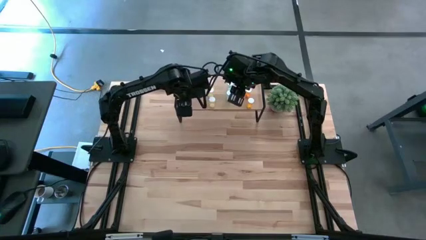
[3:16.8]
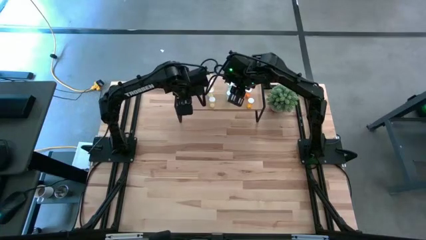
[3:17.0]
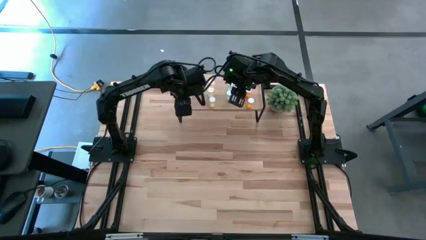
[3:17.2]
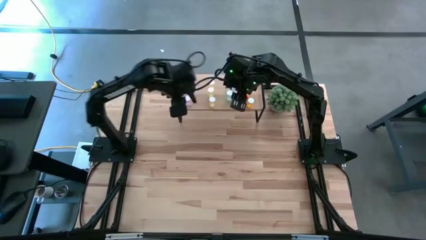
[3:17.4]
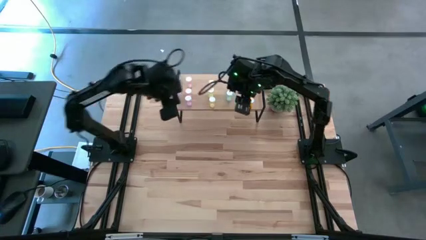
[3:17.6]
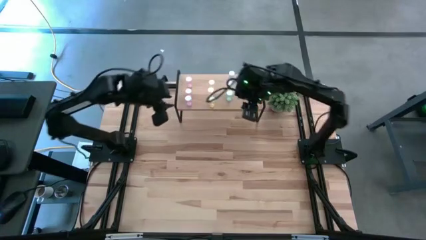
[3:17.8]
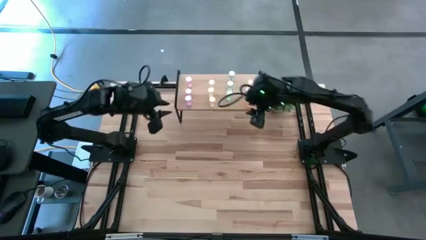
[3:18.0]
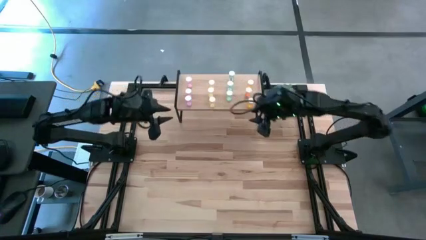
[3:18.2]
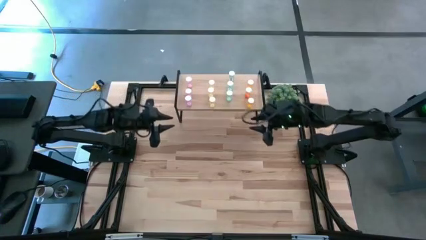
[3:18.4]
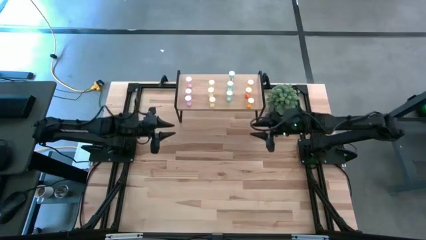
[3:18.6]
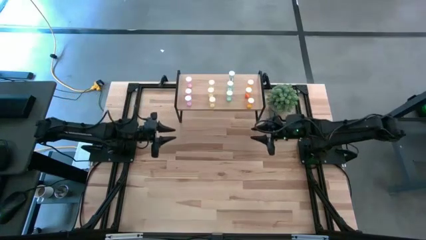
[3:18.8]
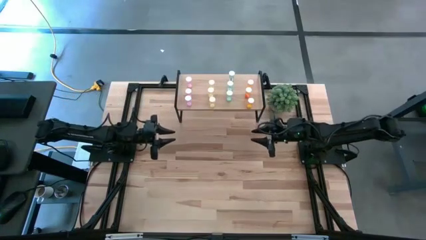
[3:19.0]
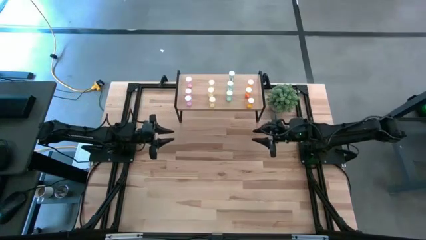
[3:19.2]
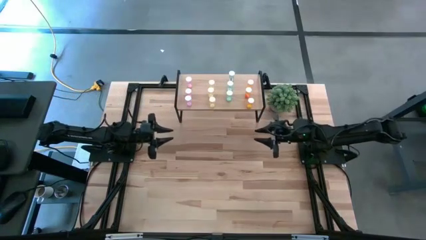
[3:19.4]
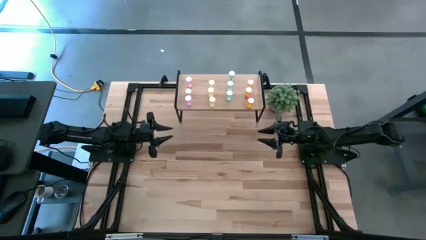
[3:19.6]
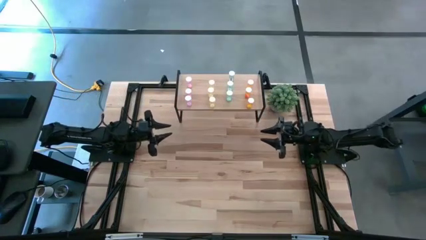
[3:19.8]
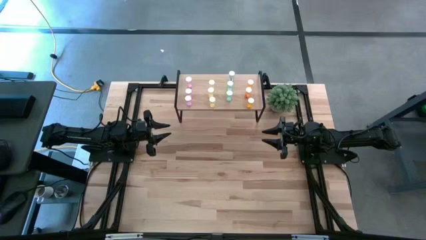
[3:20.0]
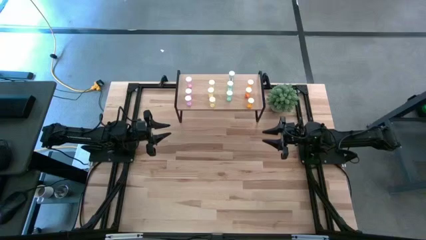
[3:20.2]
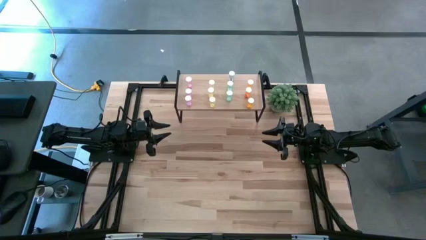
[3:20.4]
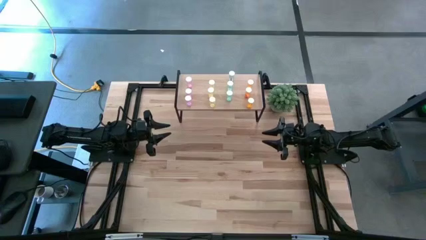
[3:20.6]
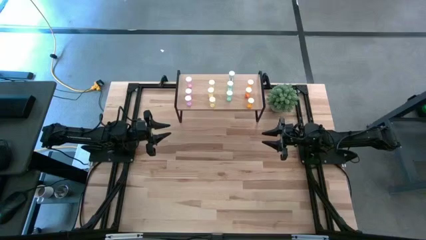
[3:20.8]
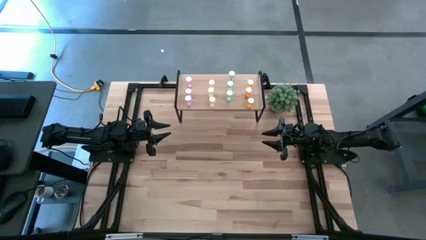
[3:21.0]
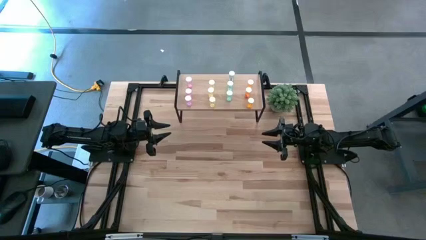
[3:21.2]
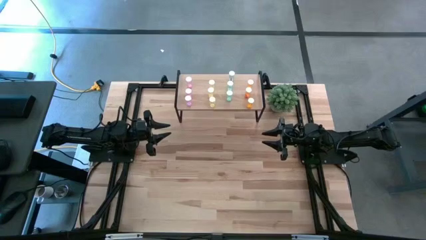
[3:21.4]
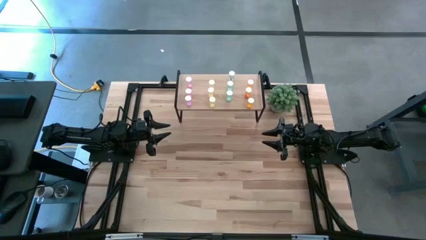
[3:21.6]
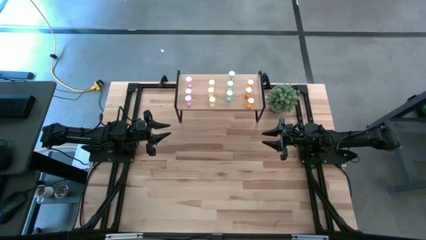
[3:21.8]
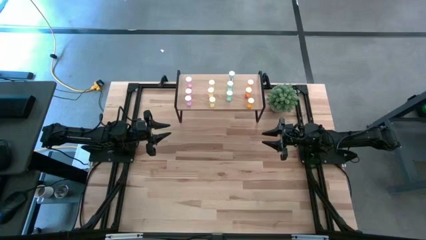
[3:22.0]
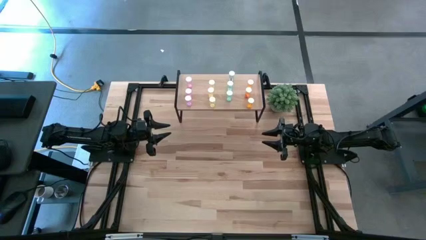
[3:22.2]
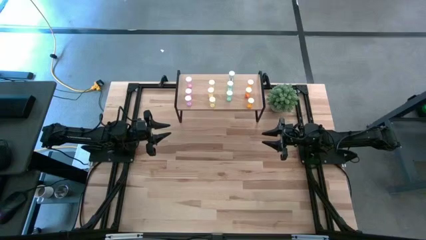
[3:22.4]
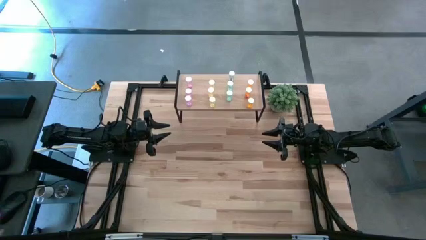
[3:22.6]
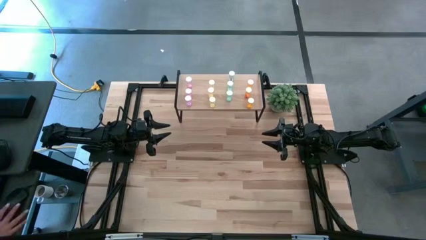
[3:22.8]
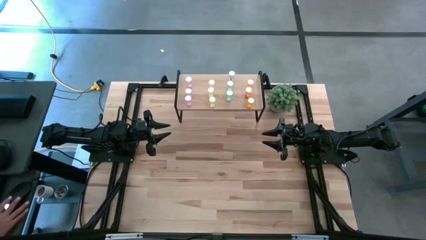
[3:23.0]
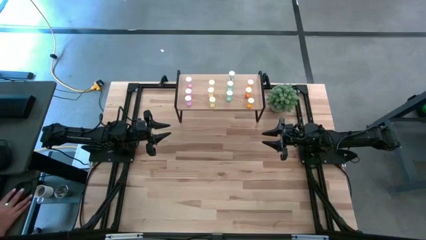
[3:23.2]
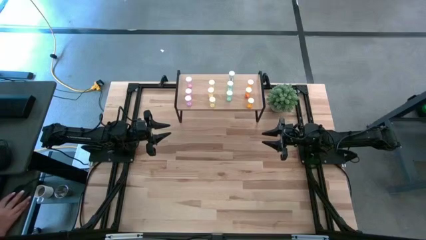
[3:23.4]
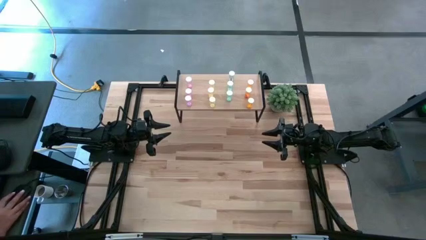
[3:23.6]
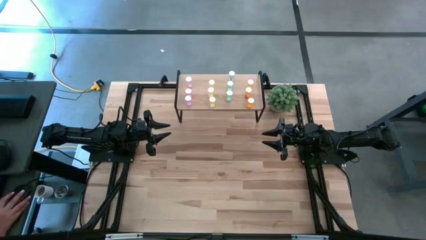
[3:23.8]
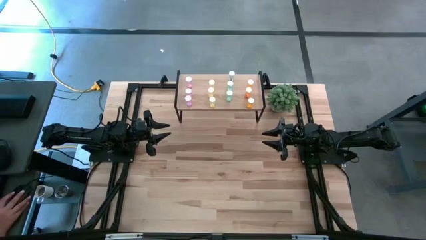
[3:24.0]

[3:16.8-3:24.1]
Task: Pick and place medicine bottles onto shelf by color
Return to Home Position

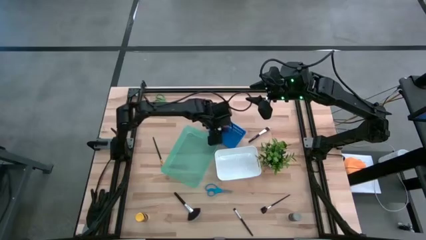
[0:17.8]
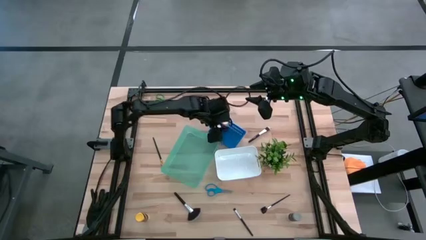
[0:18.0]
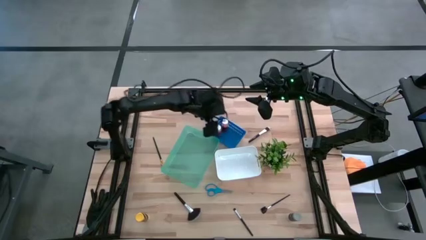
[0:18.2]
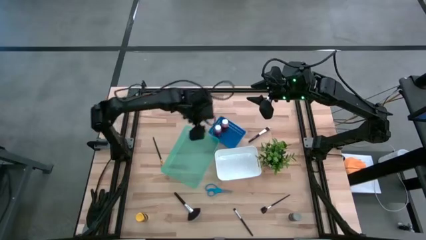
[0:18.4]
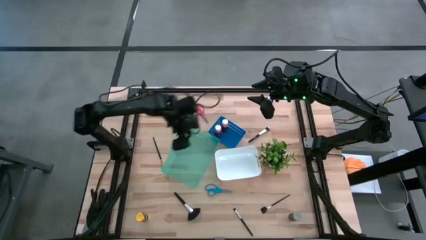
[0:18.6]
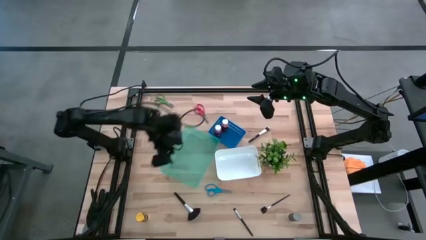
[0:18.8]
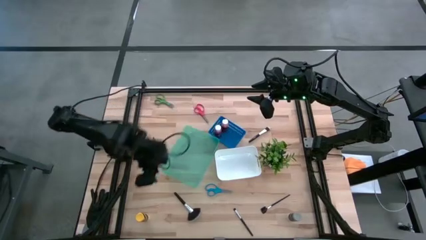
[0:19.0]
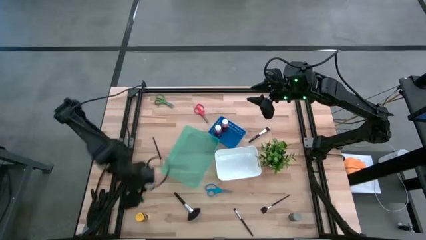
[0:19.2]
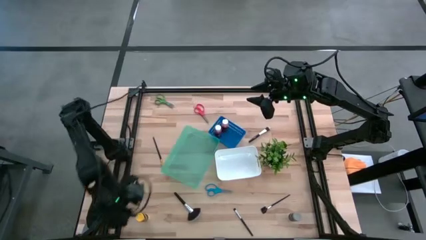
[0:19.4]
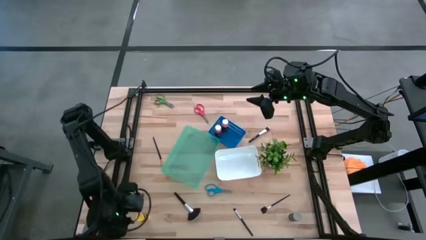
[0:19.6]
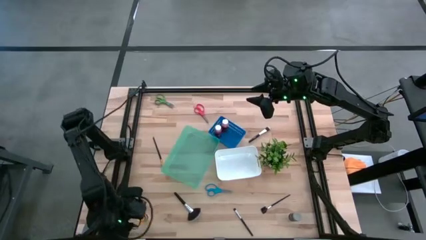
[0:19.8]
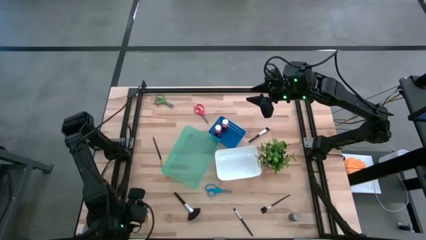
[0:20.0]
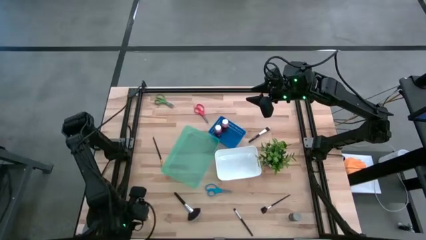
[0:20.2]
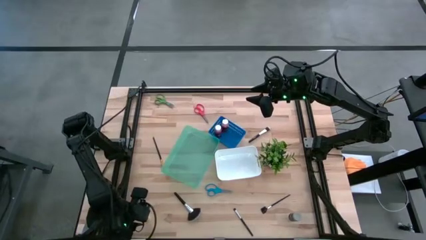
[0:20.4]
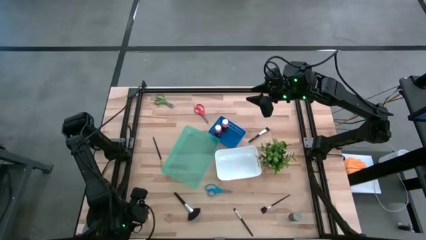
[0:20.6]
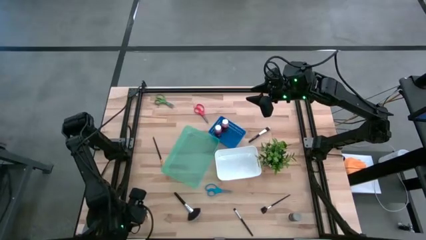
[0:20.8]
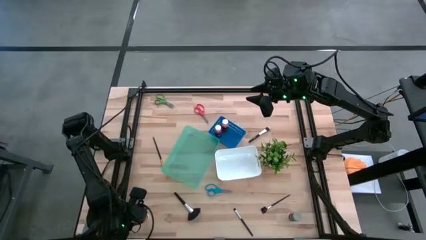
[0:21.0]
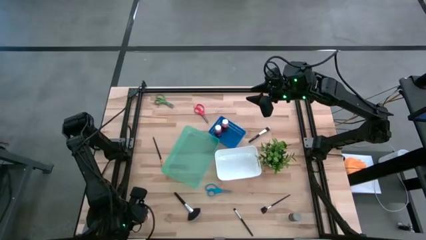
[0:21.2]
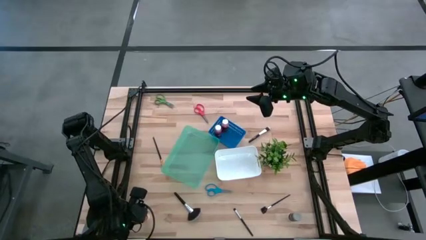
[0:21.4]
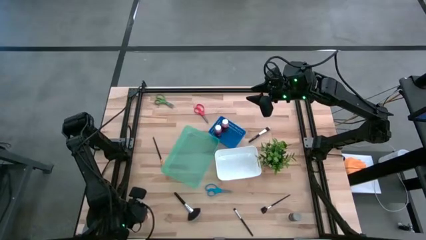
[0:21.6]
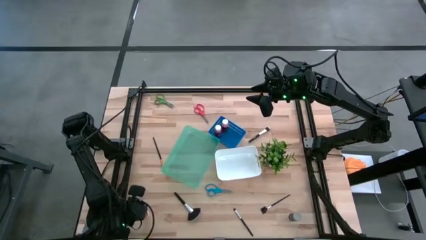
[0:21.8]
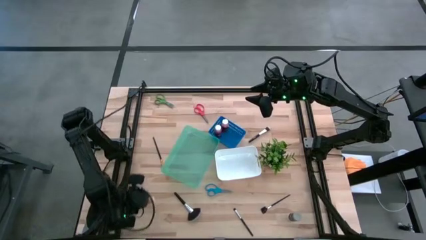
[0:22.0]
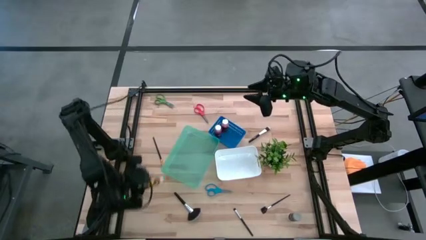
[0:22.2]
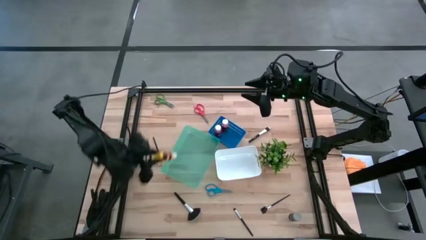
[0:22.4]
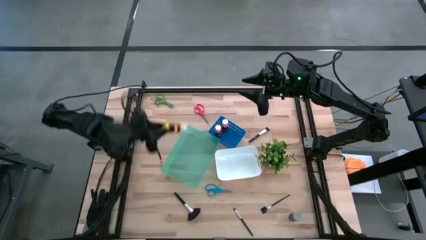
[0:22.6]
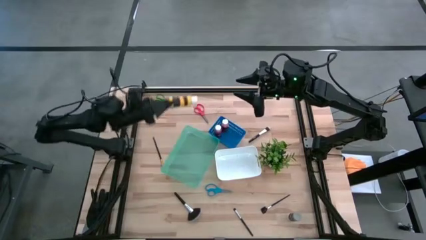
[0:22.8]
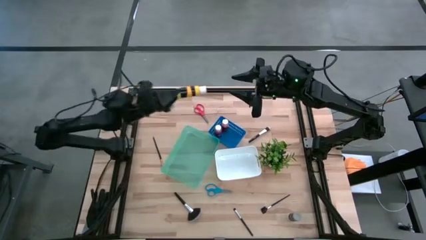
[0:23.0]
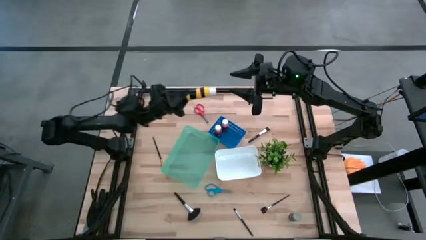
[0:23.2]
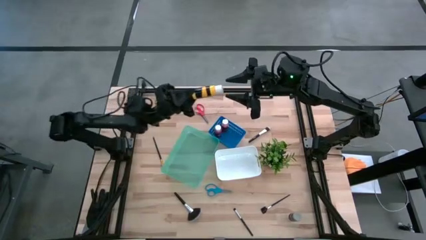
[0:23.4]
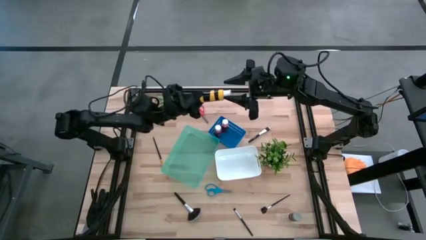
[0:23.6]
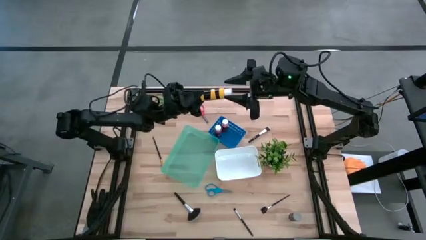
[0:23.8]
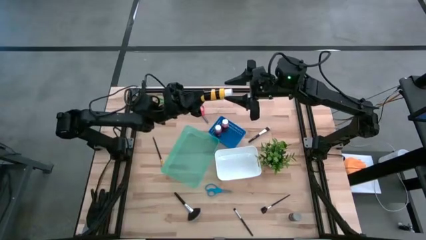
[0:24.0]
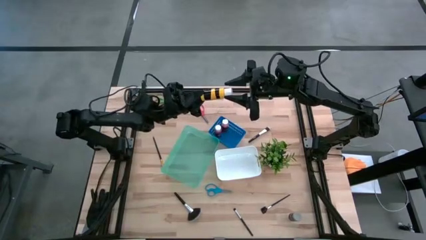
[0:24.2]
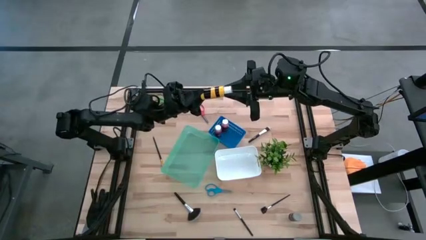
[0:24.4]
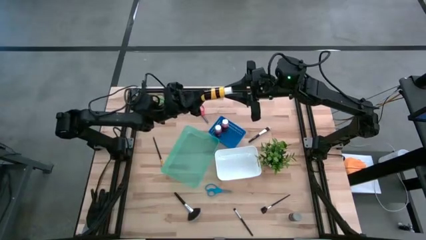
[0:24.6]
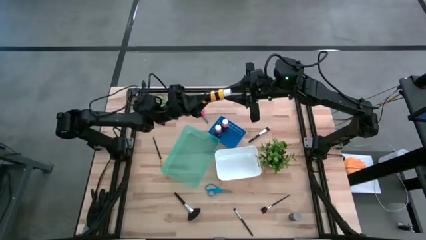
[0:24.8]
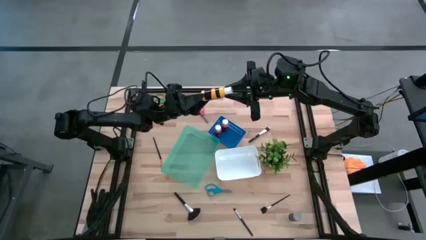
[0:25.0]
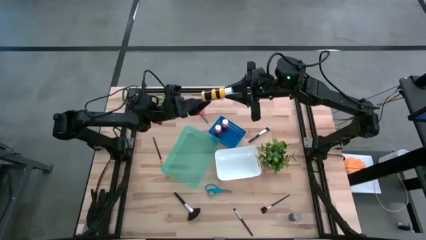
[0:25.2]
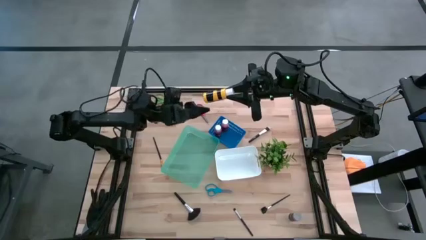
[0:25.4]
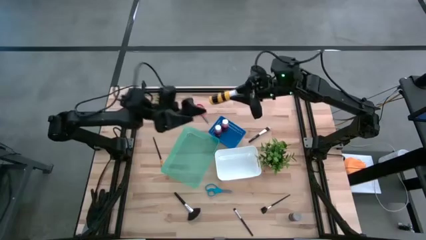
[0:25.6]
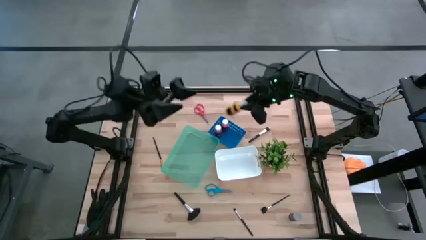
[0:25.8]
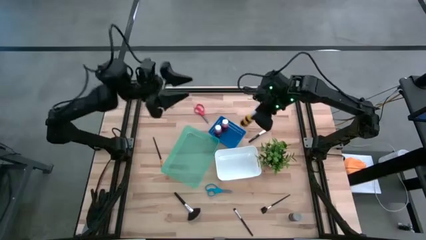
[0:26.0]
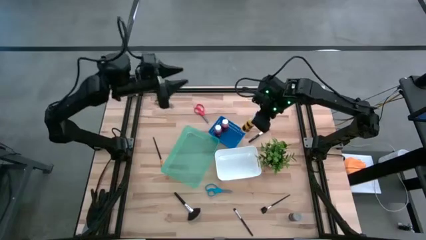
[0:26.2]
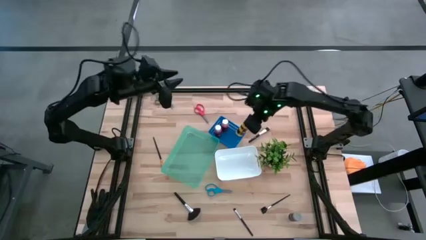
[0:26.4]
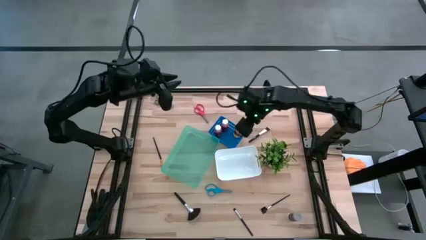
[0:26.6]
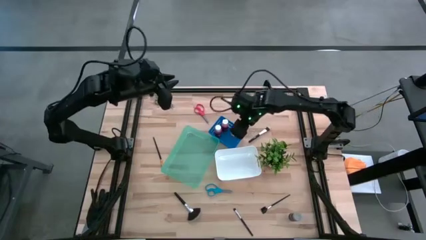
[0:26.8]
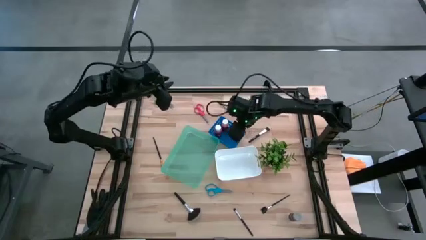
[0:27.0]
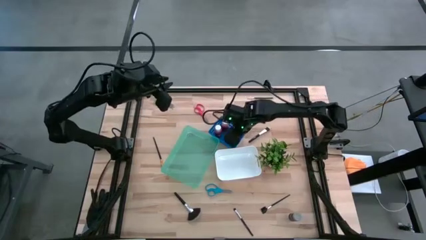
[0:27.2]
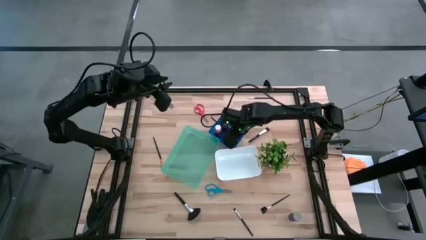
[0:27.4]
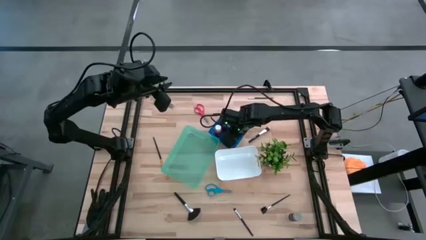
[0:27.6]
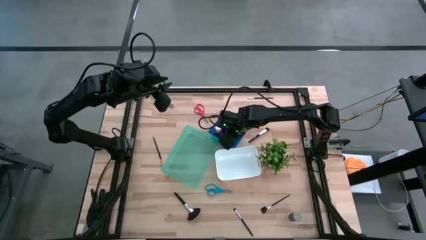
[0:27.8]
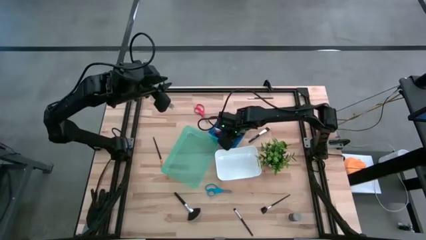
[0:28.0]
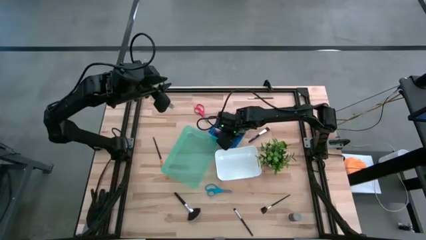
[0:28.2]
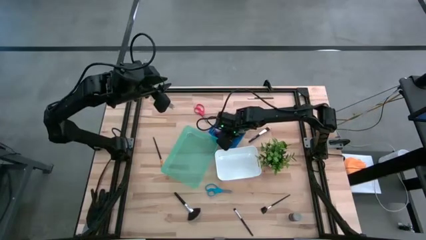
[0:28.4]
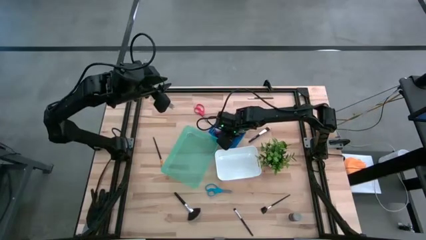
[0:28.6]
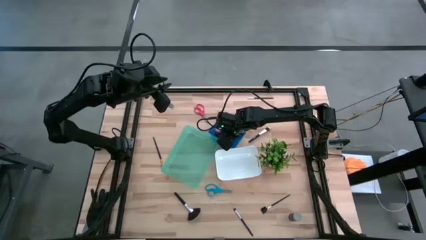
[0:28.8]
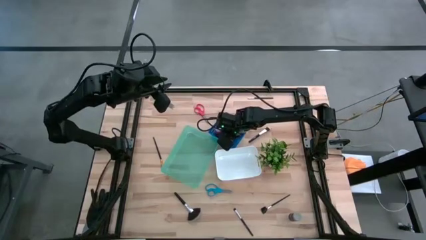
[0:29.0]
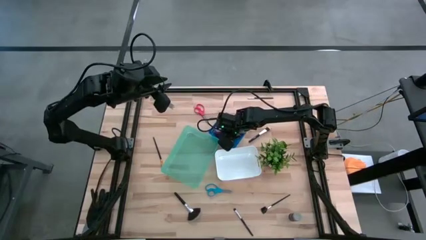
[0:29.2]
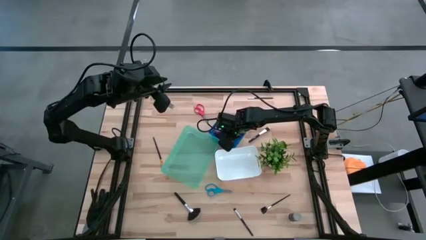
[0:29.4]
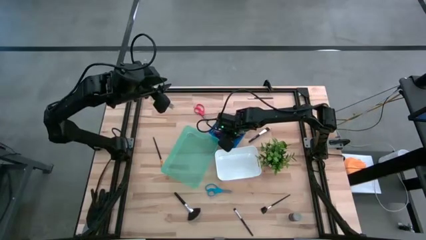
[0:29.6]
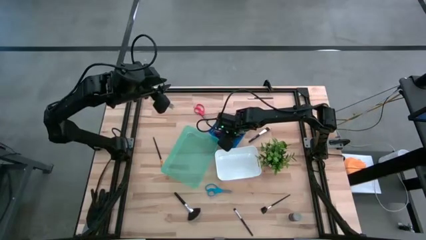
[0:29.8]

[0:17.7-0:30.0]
Task: Pick & Place Paint Supplies
Put the yellow paint bottle into the blue bin
